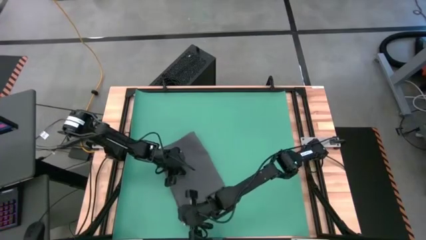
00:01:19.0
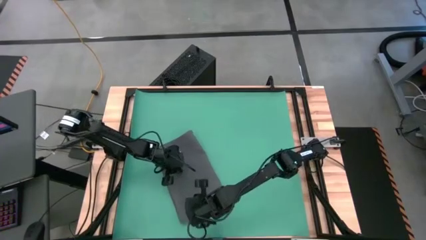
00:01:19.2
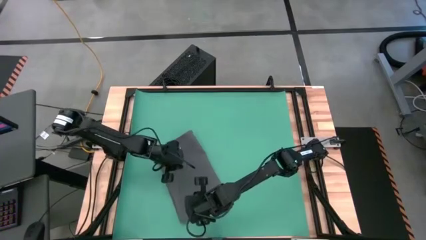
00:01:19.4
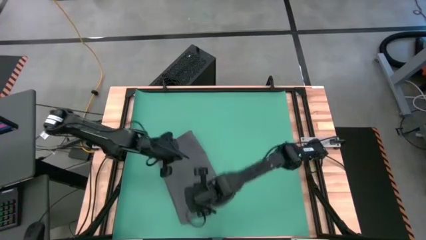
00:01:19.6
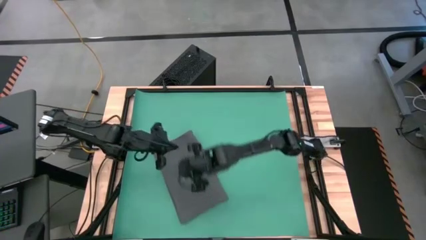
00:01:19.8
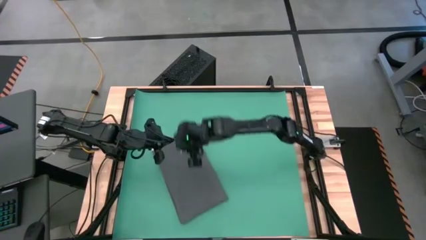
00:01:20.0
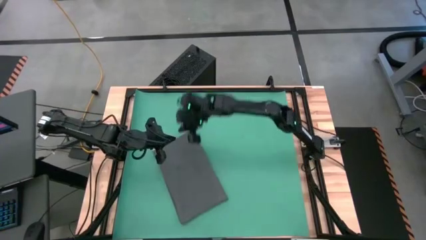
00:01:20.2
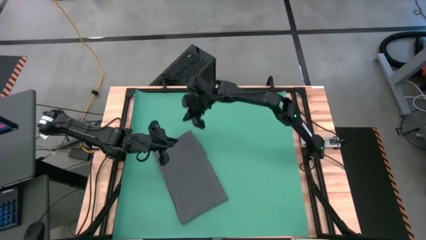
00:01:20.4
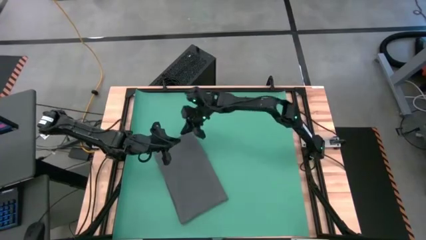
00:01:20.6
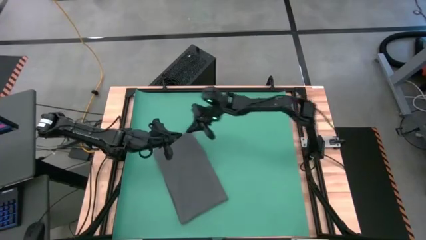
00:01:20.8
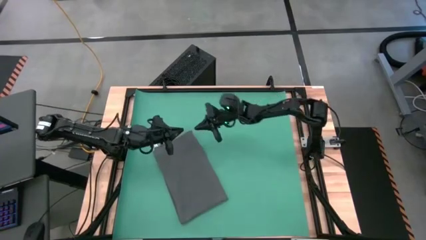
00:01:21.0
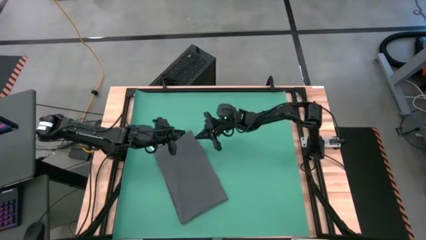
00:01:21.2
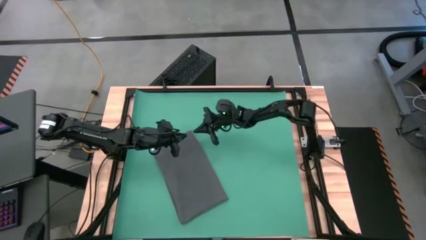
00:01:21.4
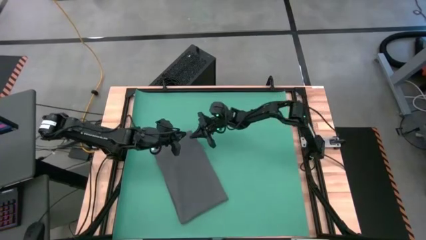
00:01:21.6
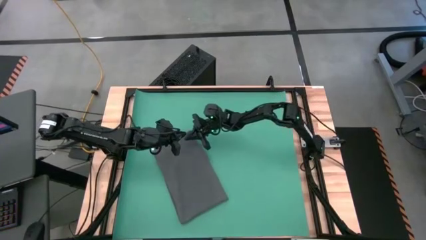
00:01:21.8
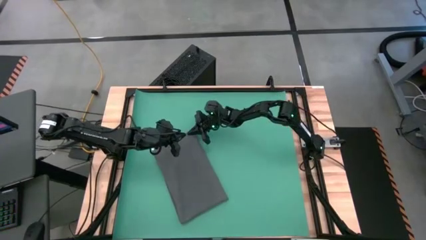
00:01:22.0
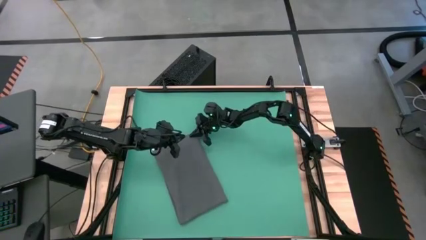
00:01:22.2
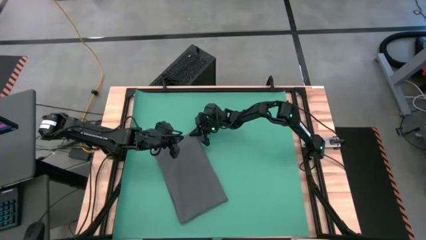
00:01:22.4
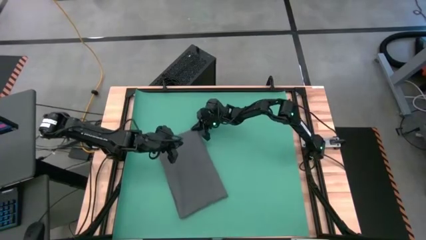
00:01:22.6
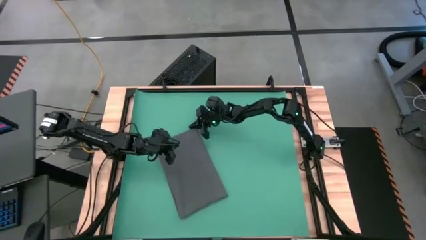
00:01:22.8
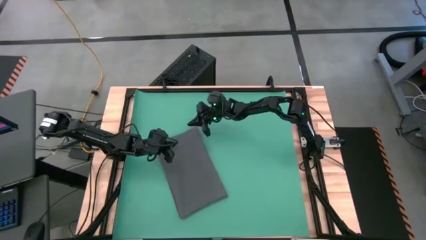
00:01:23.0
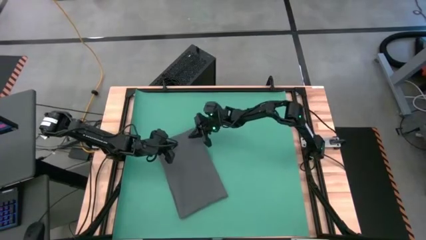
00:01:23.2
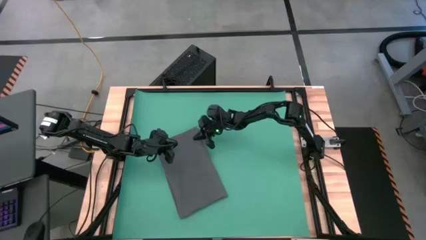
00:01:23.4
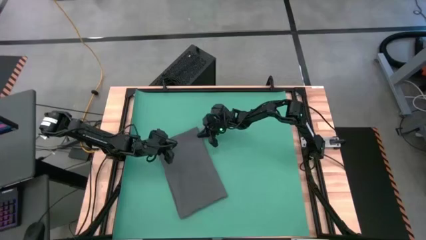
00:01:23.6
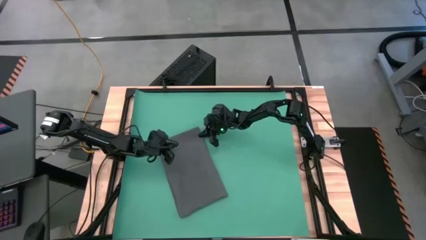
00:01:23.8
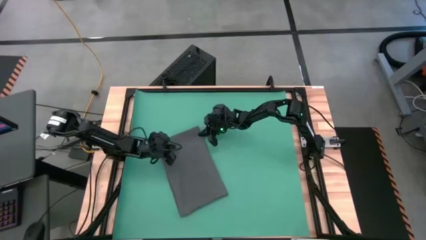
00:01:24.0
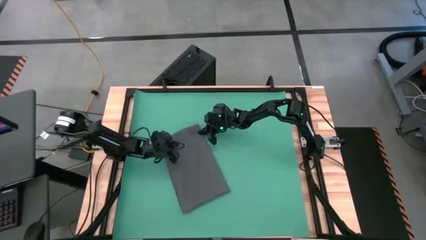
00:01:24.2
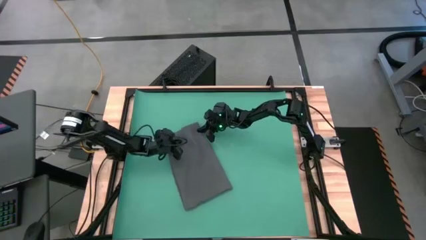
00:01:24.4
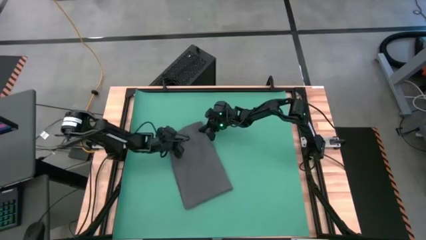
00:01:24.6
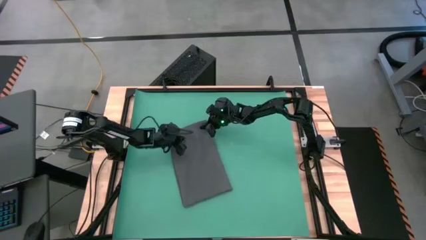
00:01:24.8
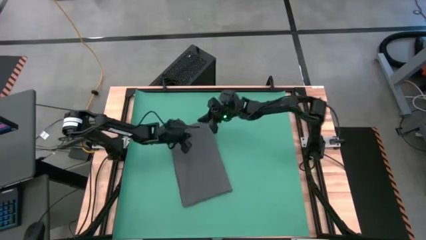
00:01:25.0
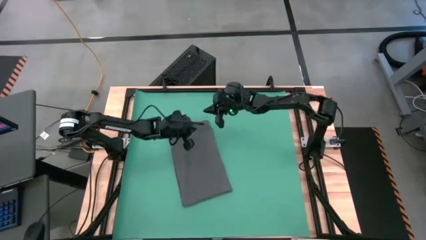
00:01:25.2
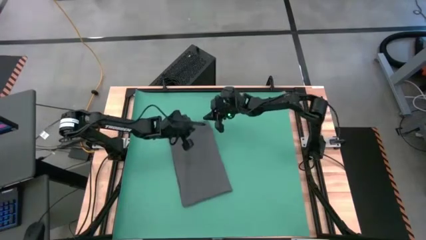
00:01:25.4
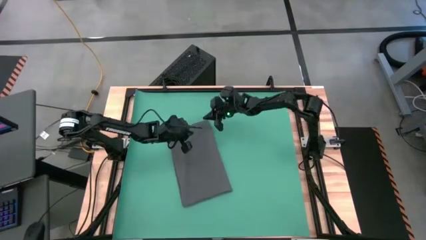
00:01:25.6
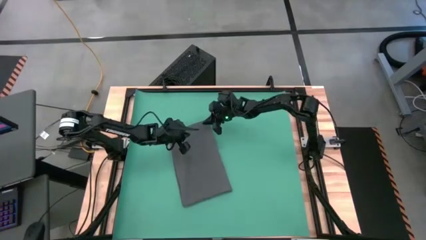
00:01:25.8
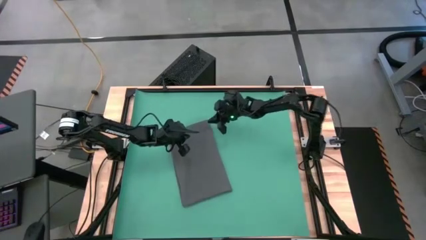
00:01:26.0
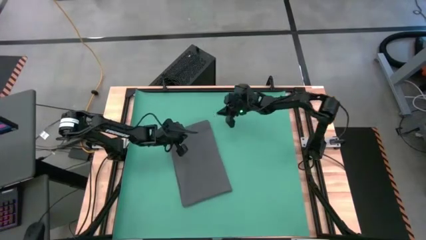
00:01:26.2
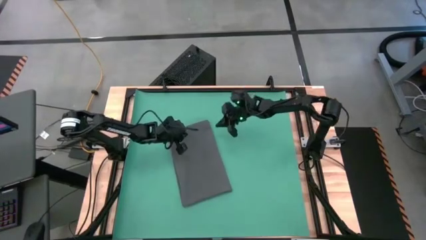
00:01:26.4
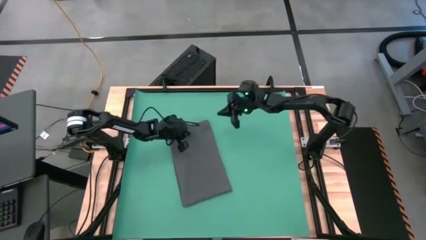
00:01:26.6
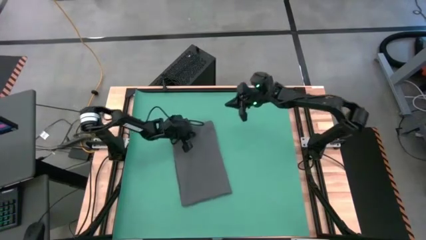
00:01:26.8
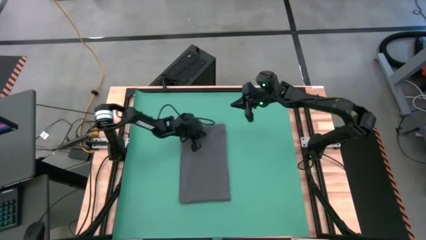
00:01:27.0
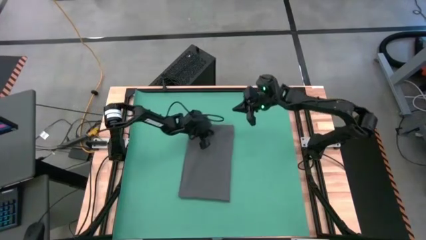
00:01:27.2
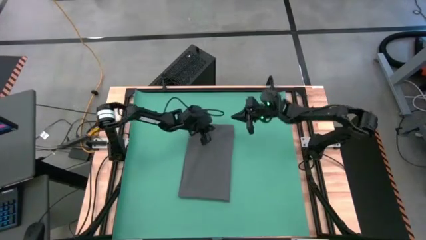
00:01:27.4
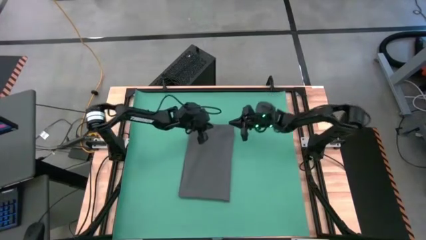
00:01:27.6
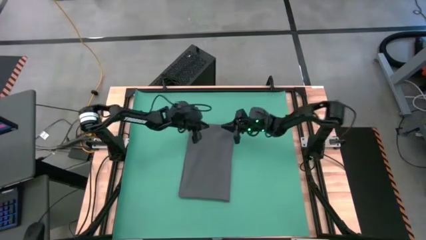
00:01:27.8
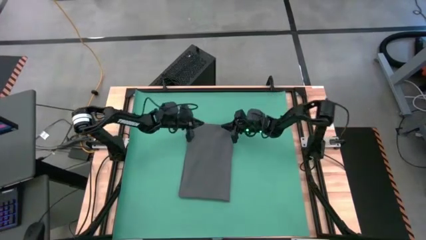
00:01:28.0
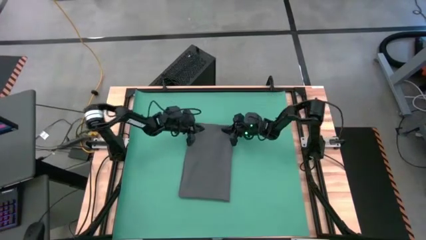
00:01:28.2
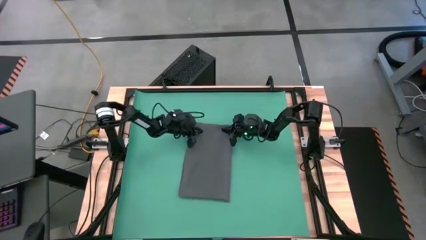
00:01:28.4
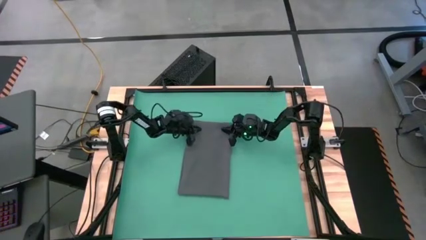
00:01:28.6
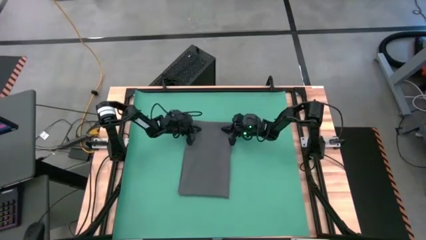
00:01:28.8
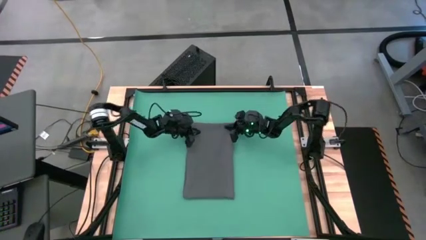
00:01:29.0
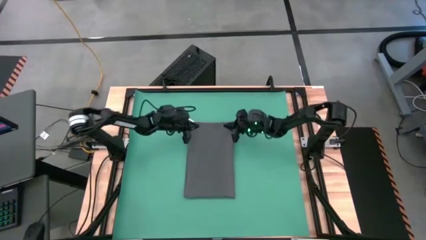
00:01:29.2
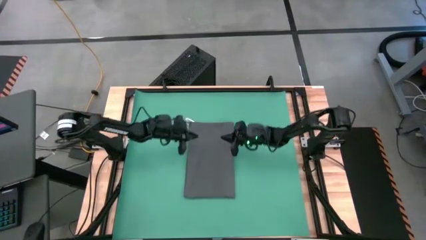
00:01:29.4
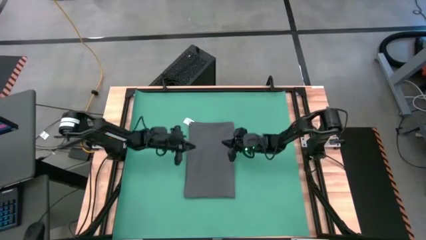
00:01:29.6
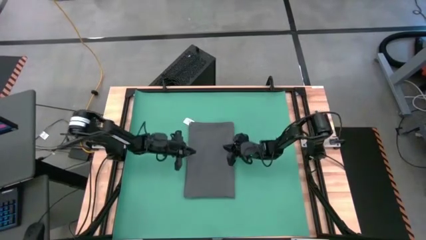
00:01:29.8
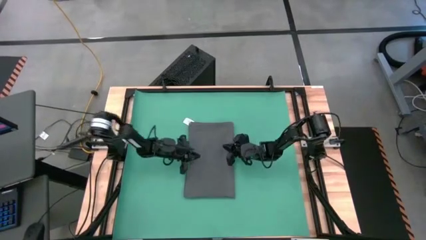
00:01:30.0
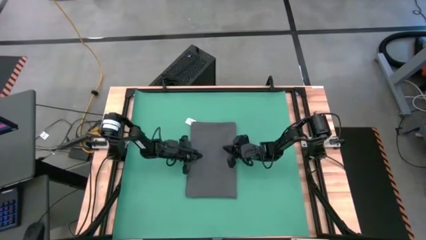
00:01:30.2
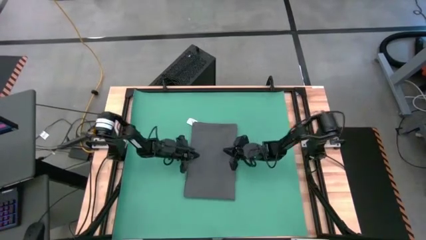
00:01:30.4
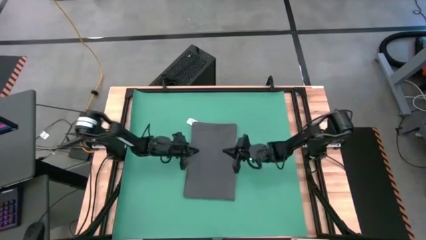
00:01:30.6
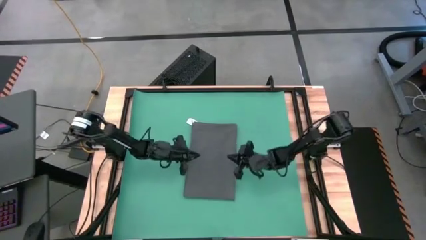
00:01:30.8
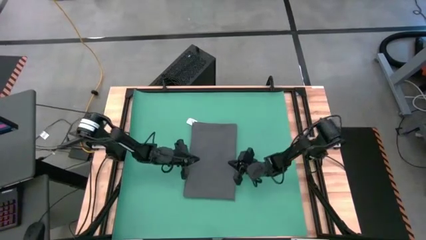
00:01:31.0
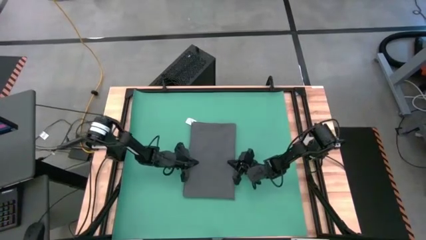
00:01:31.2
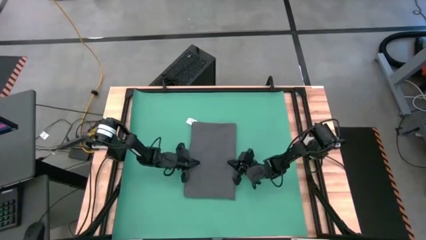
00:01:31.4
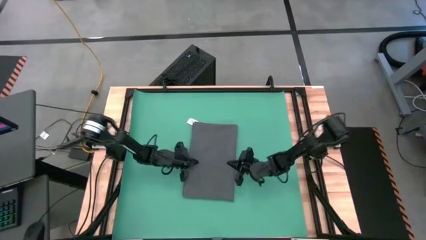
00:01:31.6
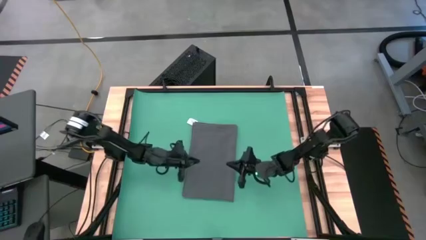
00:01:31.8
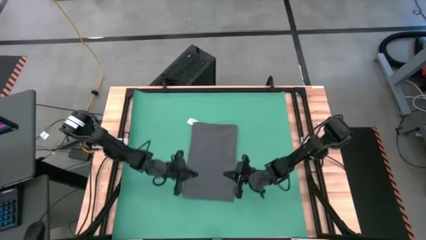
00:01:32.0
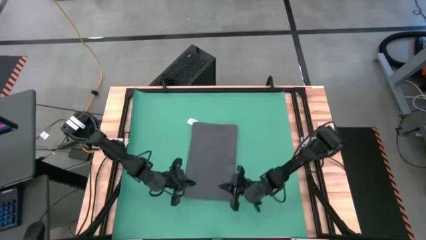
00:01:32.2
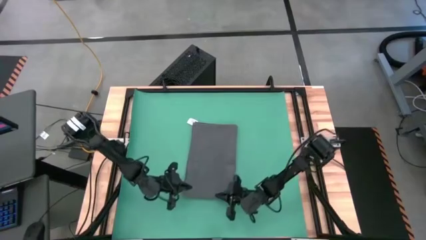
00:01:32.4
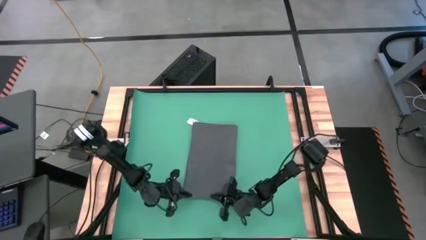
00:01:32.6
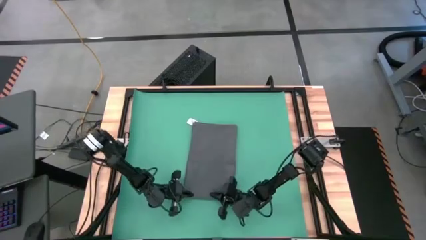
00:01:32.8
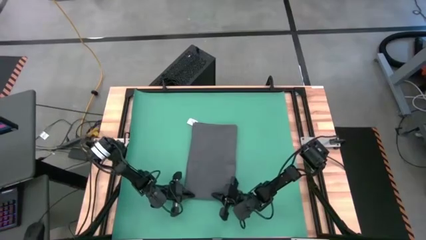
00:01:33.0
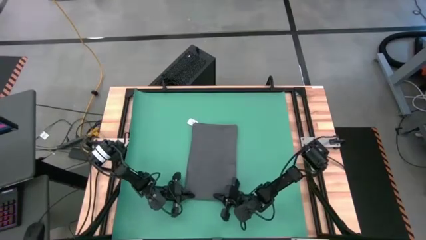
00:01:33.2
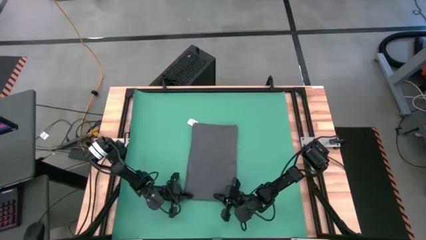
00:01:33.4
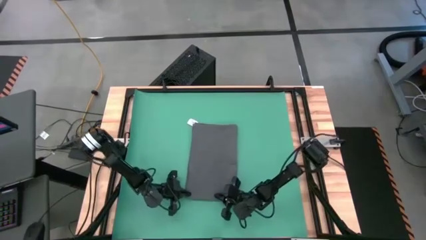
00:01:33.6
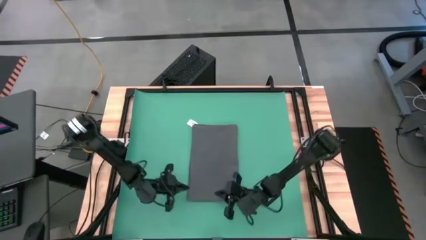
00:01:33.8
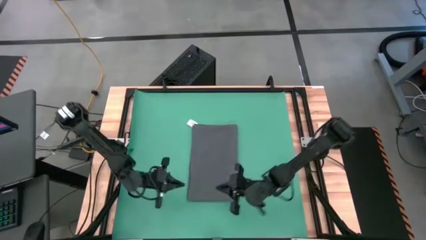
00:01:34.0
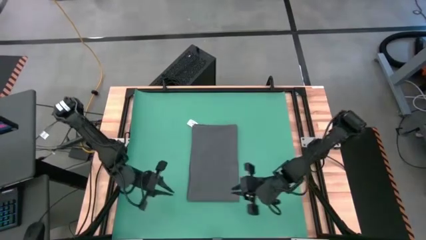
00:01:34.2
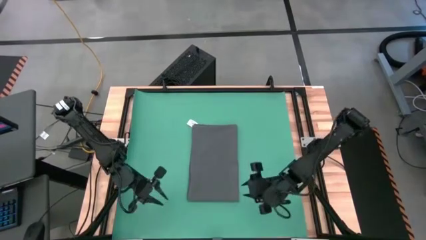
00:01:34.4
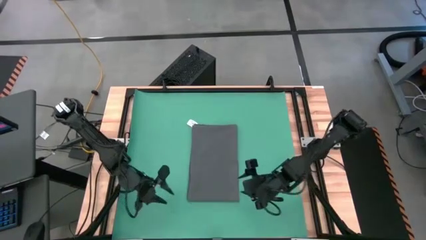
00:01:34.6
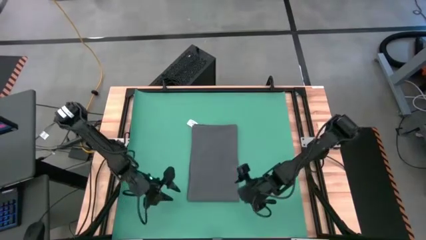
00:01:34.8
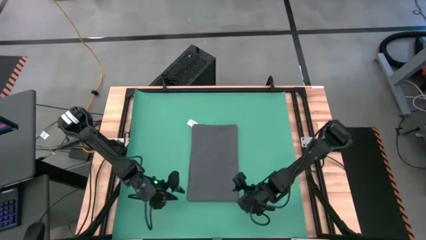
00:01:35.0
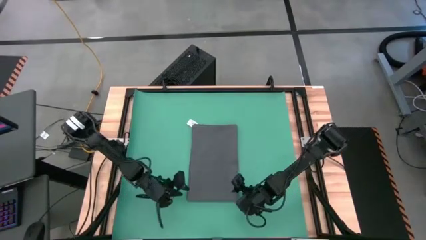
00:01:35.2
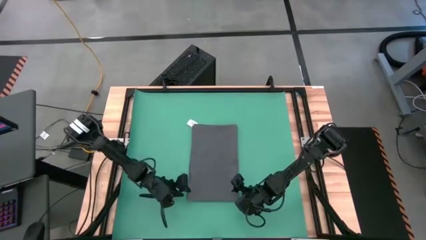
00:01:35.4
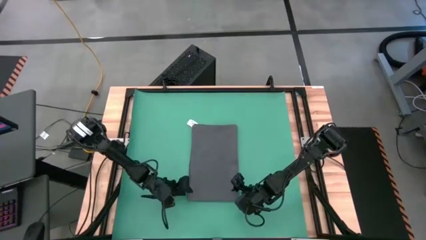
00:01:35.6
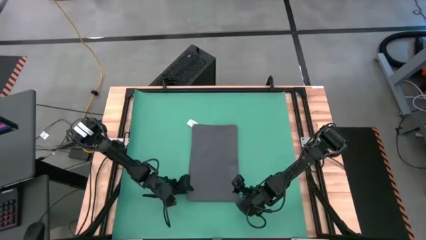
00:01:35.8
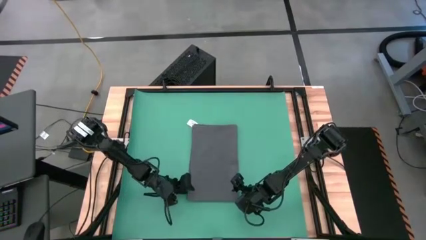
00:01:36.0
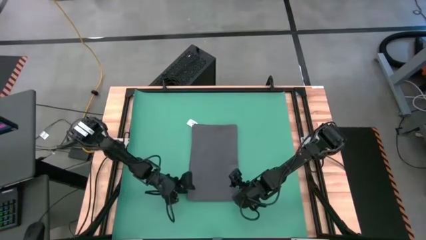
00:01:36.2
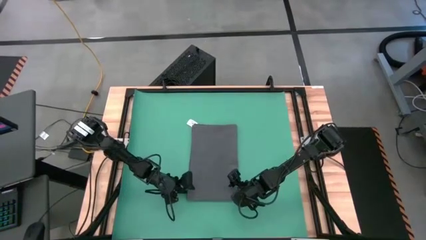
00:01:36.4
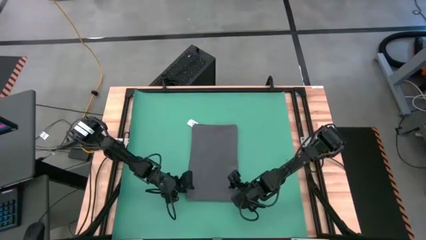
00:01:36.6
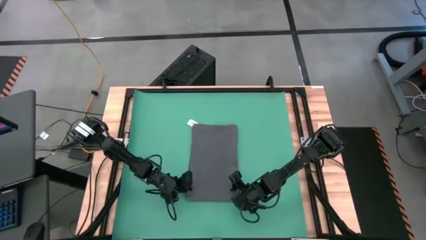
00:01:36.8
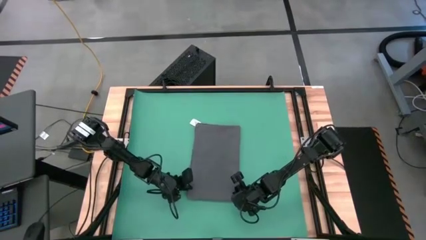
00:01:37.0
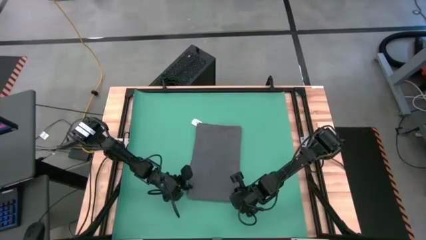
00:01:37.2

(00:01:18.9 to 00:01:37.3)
Task: Roll towel
Roll the gray towel
